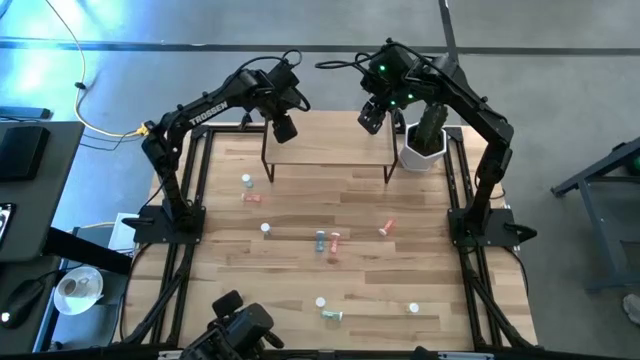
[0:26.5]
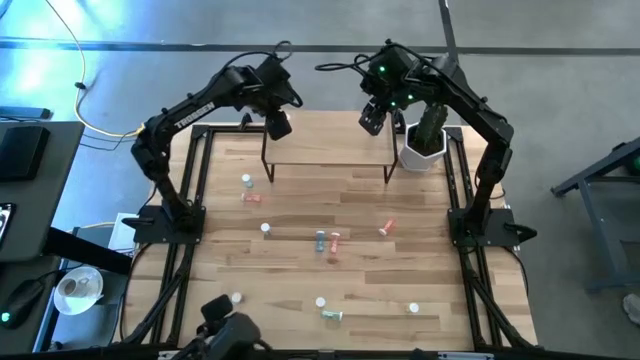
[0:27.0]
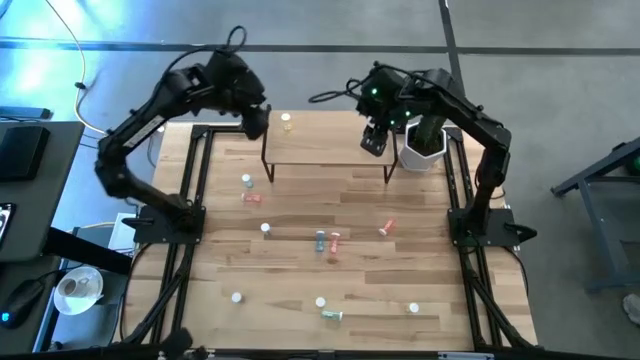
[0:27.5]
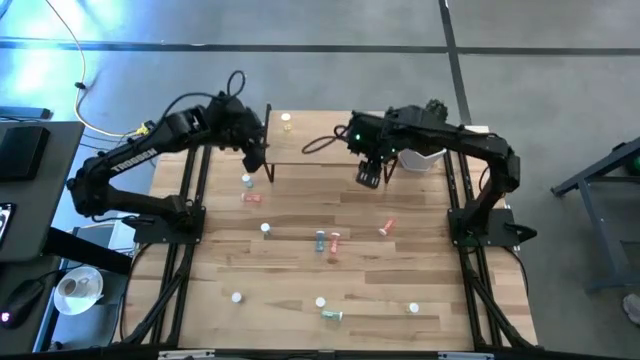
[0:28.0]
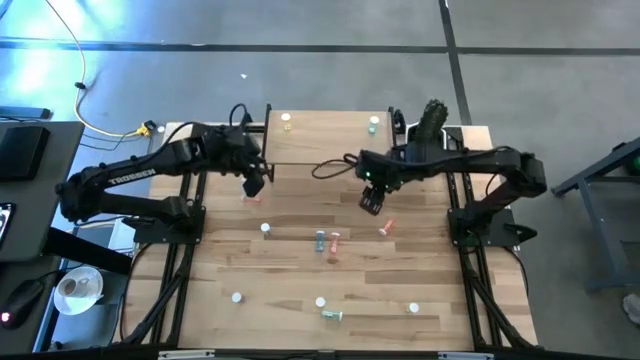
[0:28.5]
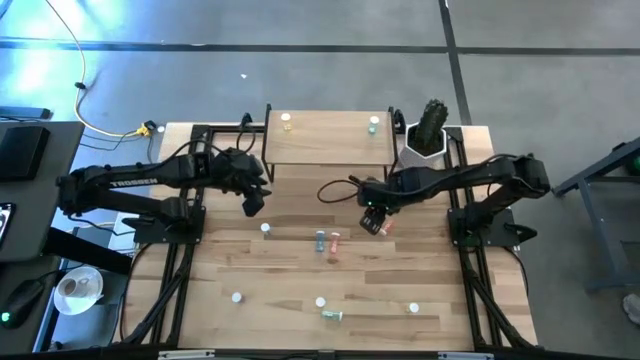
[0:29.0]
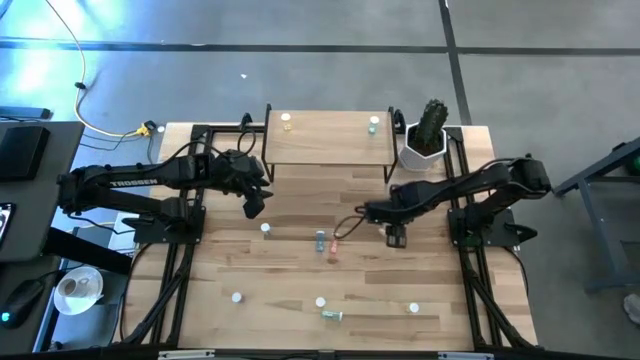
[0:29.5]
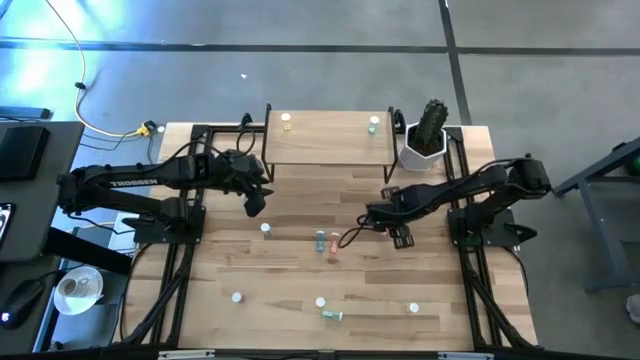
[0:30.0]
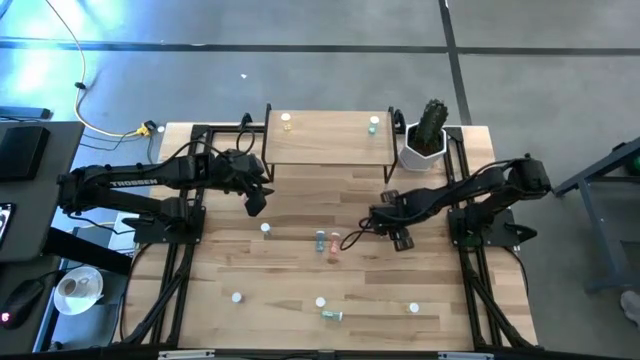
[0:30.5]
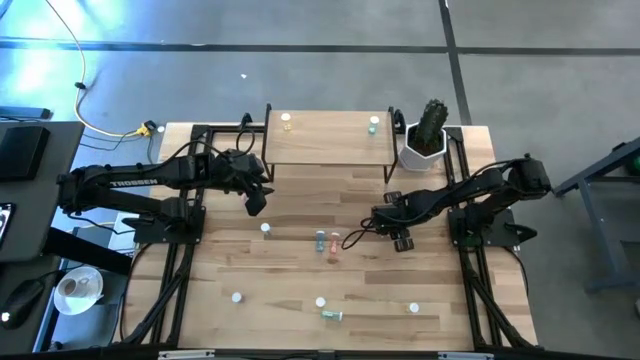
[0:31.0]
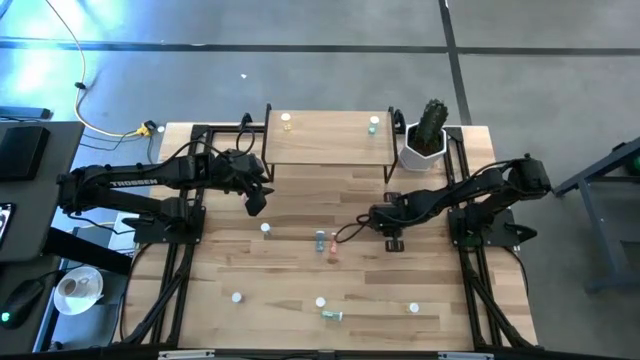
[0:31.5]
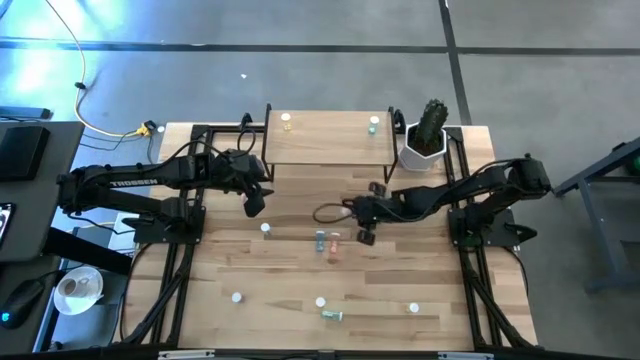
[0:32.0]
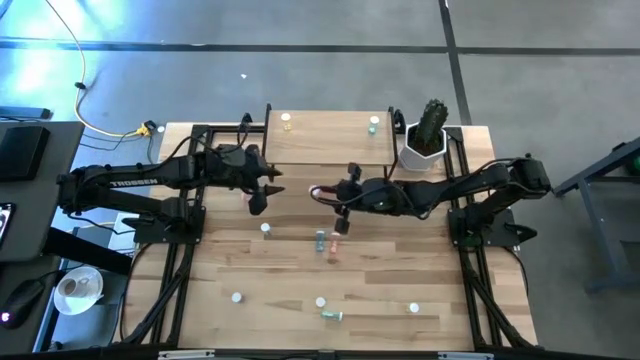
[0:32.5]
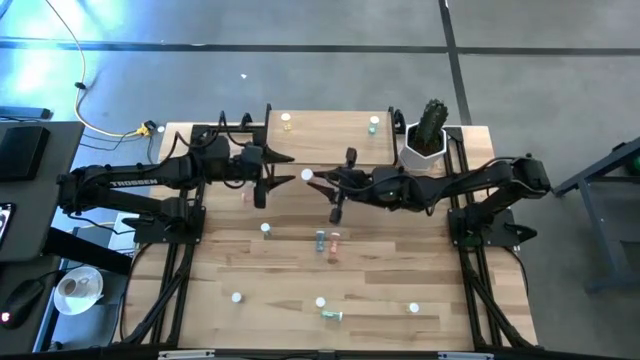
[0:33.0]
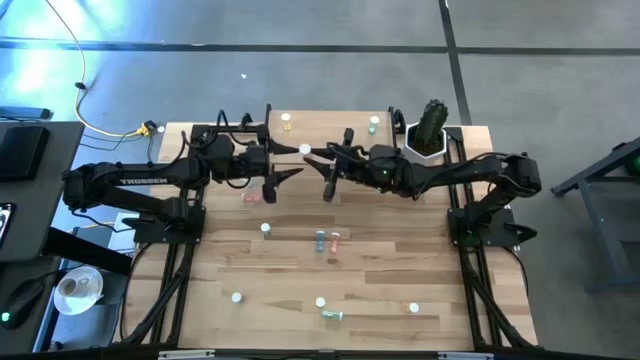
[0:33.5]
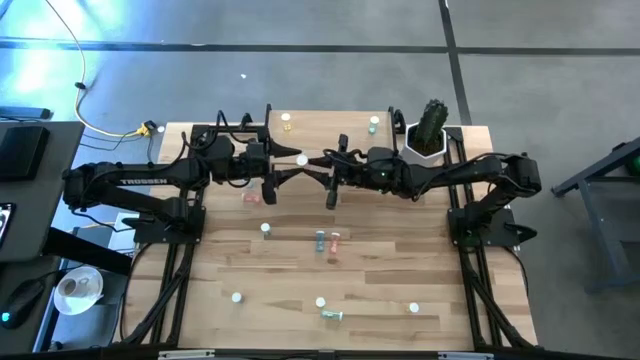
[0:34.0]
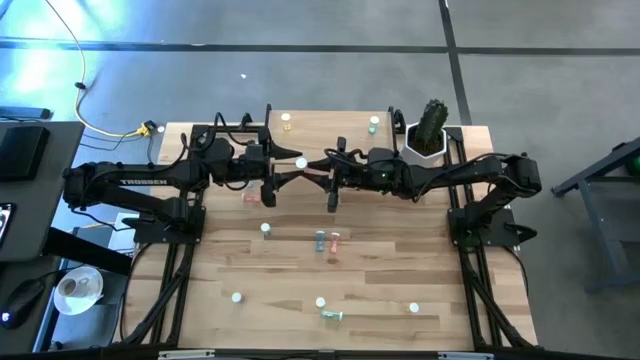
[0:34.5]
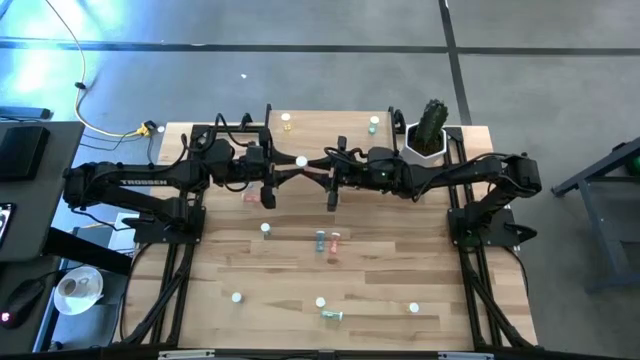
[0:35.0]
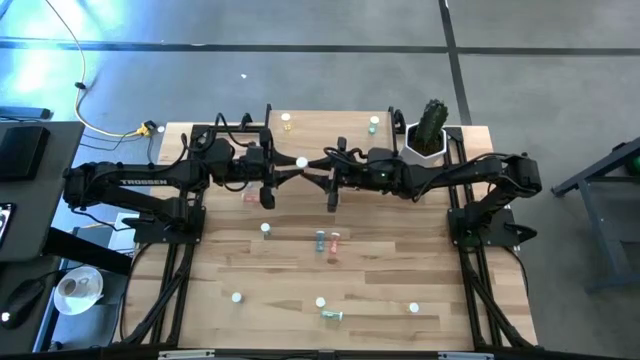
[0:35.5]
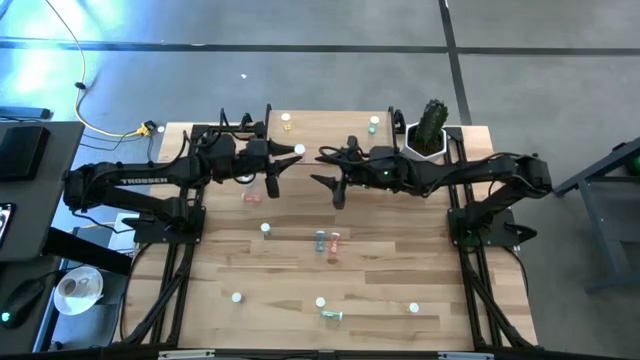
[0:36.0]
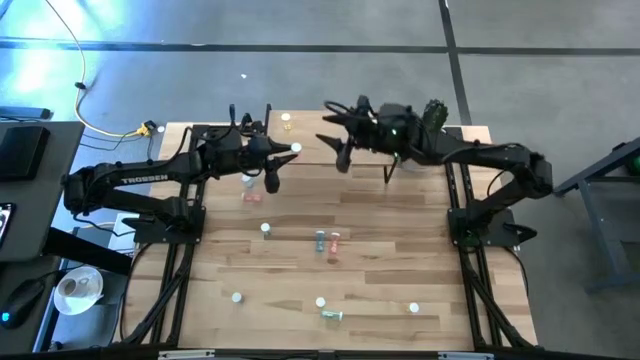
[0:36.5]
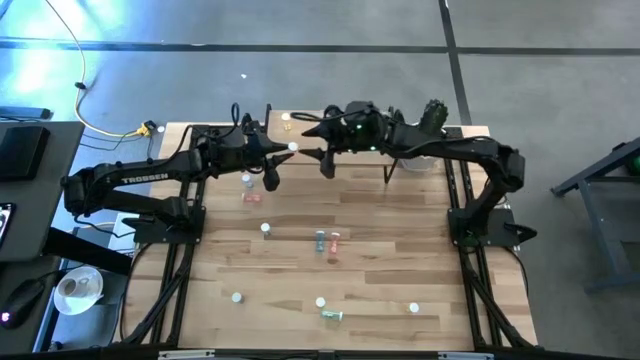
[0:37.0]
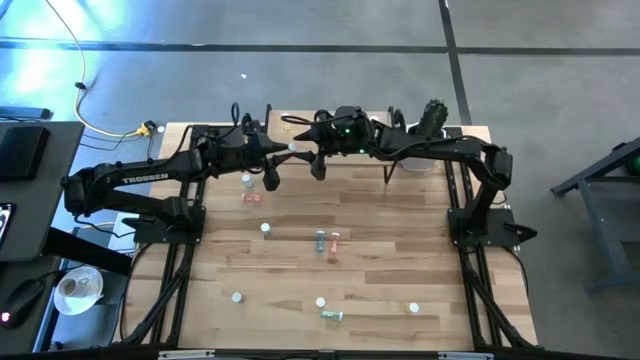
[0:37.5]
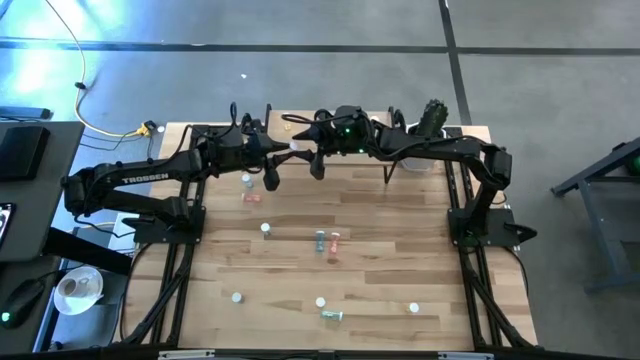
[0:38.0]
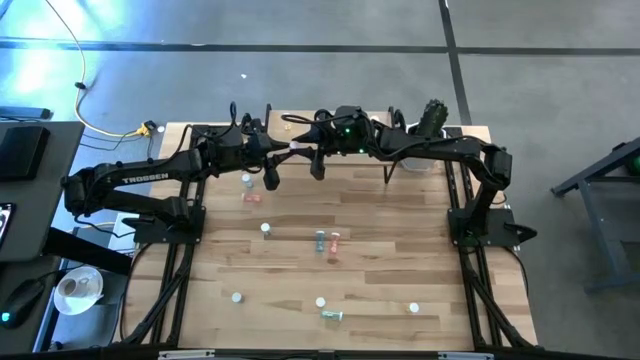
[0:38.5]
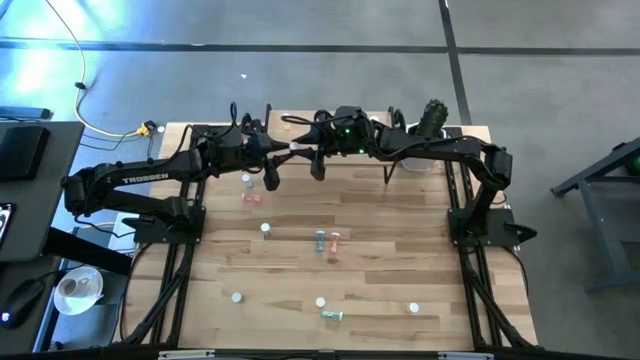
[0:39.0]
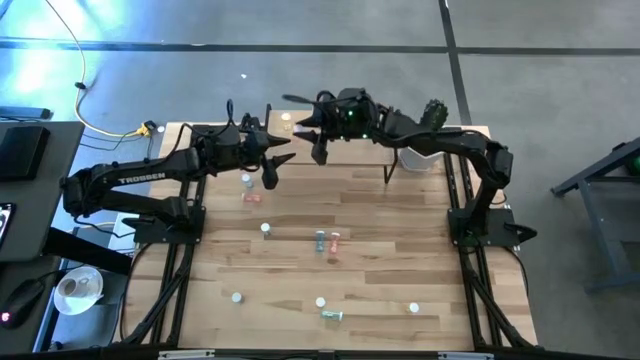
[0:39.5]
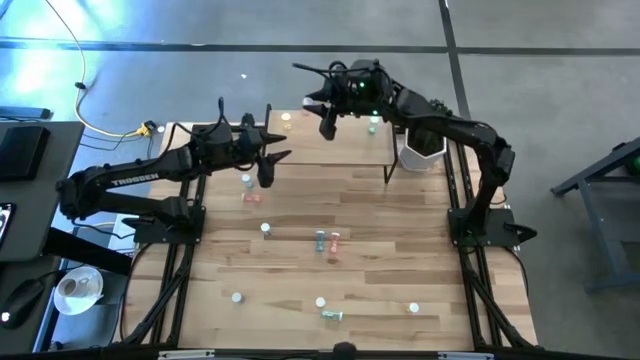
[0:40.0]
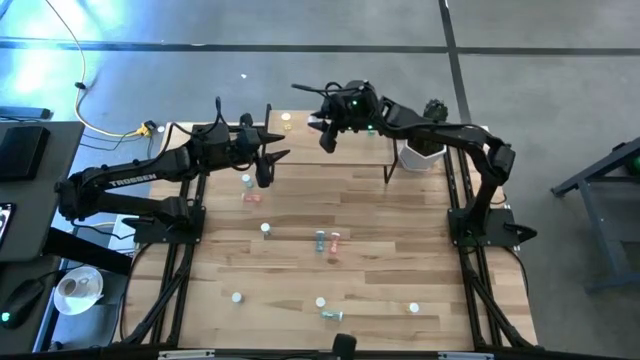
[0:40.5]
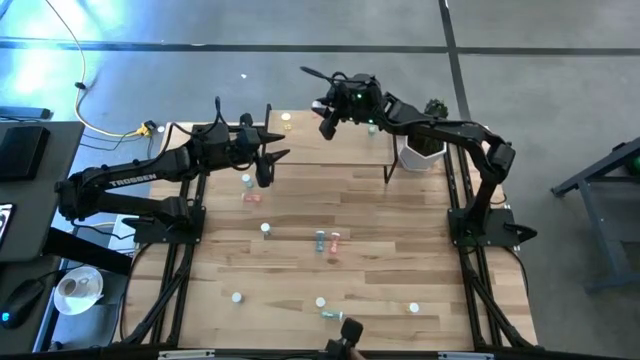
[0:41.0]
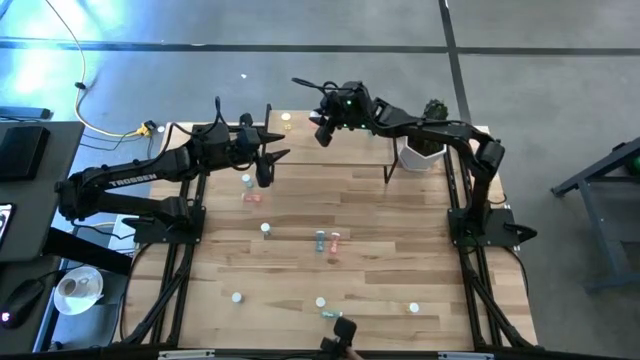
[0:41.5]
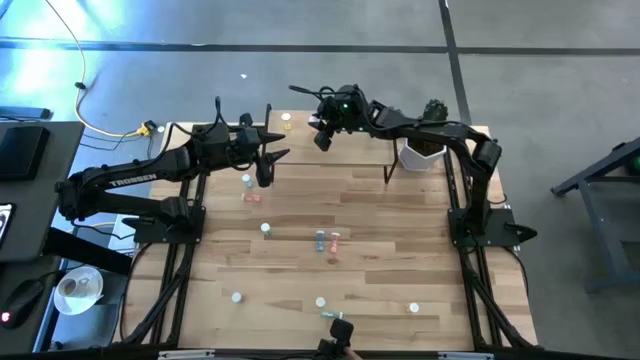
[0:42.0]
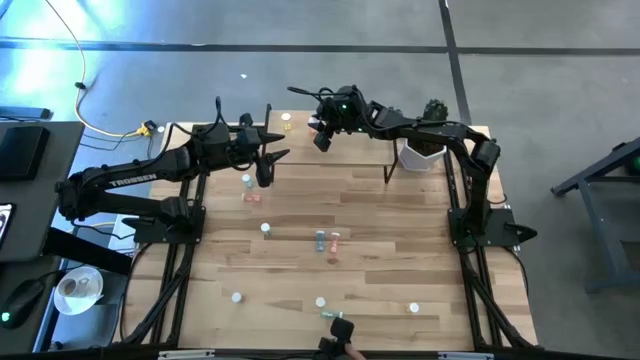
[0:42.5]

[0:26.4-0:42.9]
Task: Pick and place medicine bottles onto shelf by color
Put the right pink pill bottle on the shelf

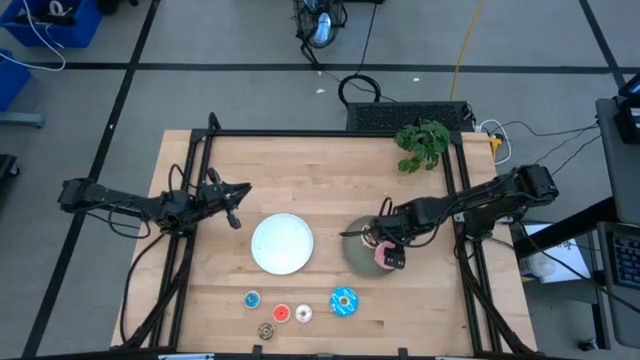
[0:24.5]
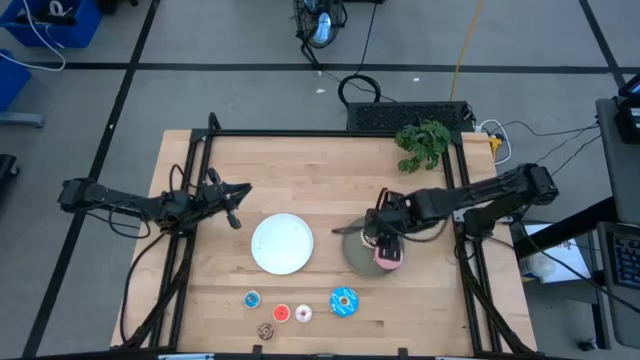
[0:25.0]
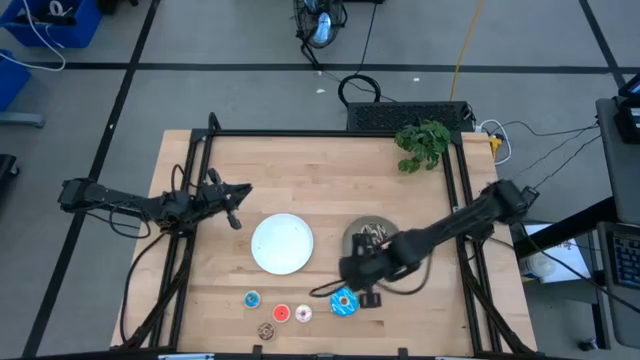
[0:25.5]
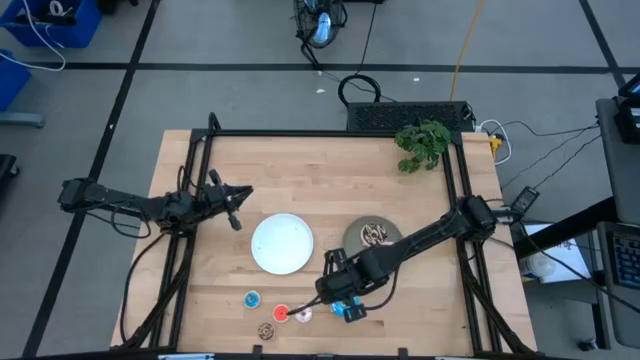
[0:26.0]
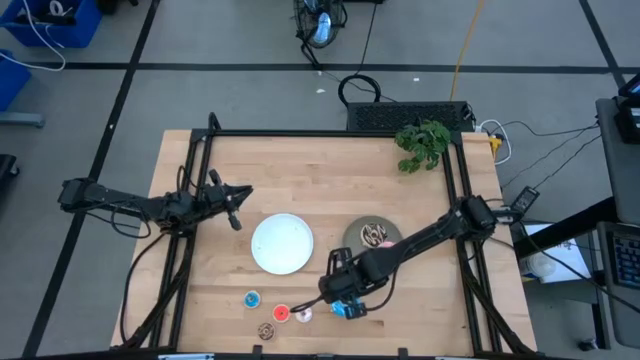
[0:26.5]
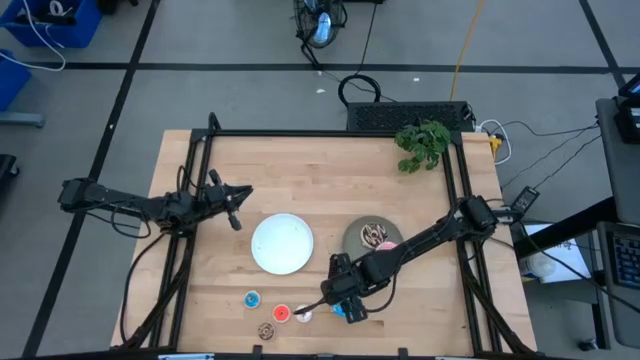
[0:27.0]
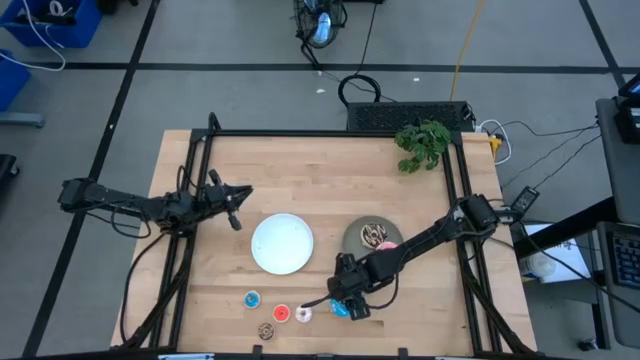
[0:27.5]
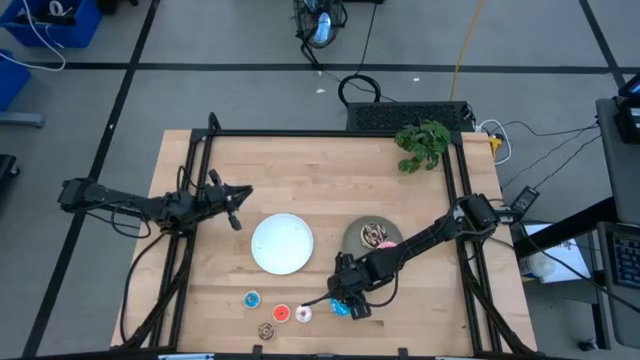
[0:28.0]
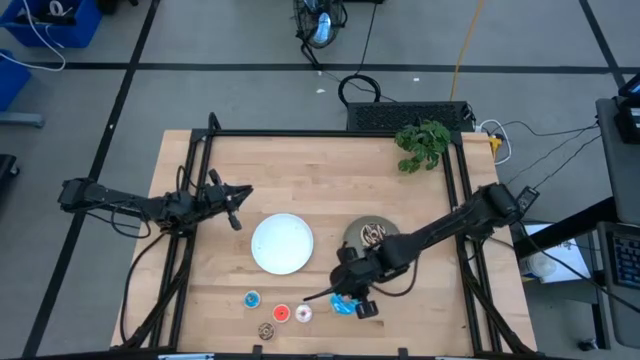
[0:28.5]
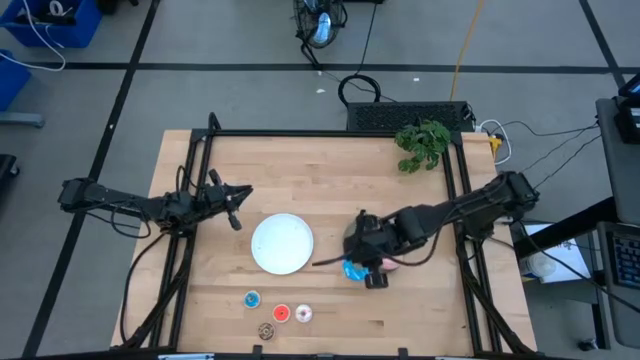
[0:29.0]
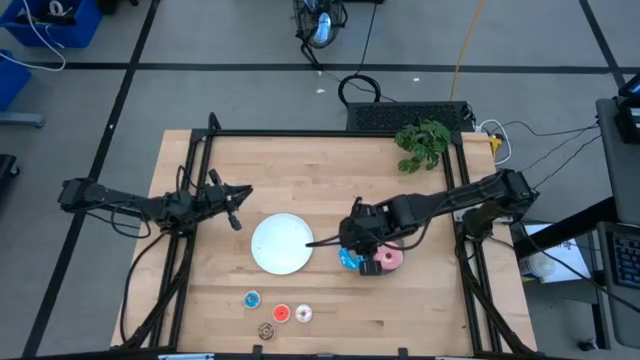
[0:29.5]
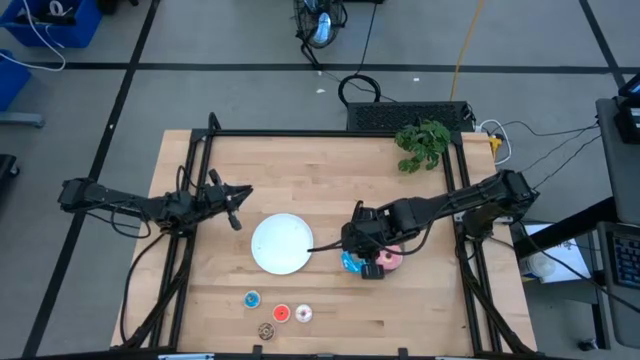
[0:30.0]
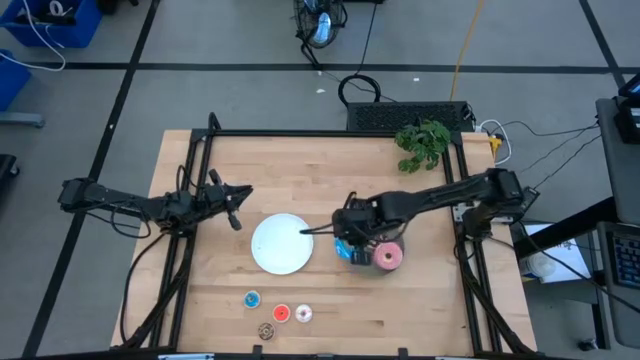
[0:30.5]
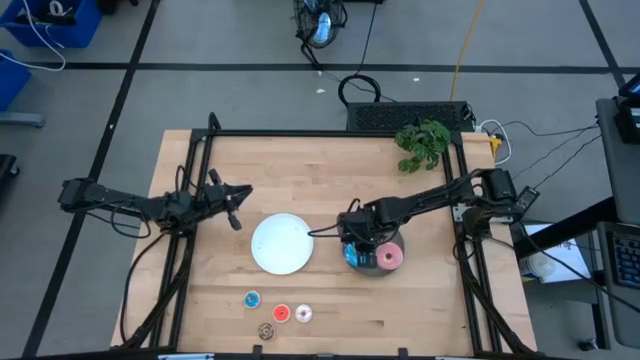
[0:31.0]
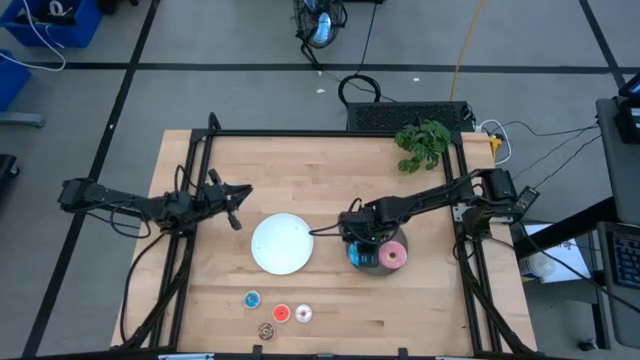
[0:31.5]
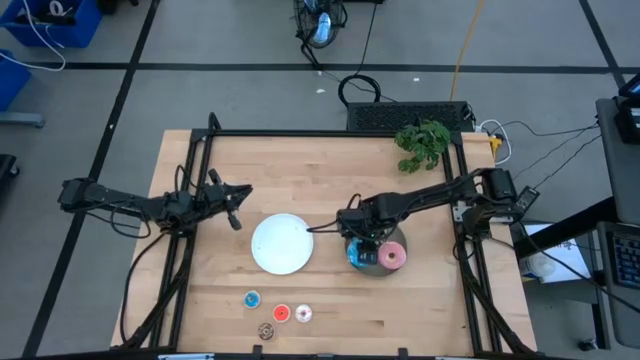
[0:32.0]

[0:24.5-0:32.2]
Task: Pick & Place donuts
Put the large blue donut on the gray plate
